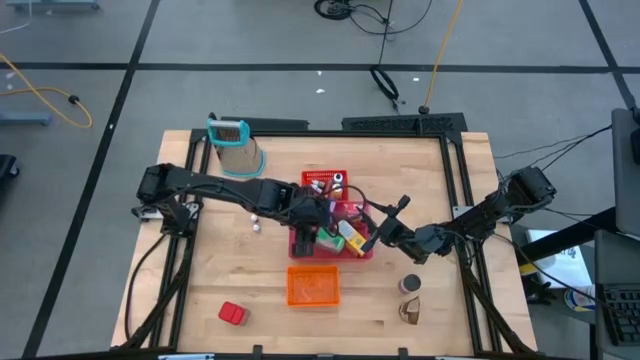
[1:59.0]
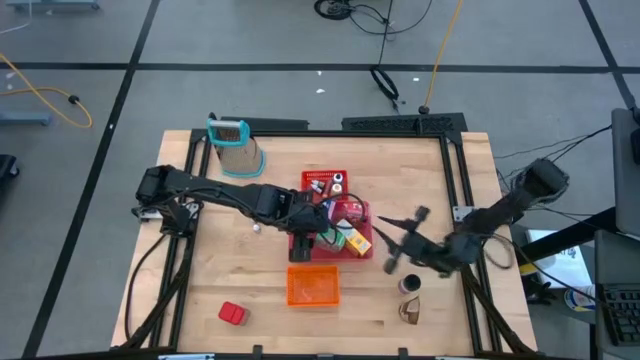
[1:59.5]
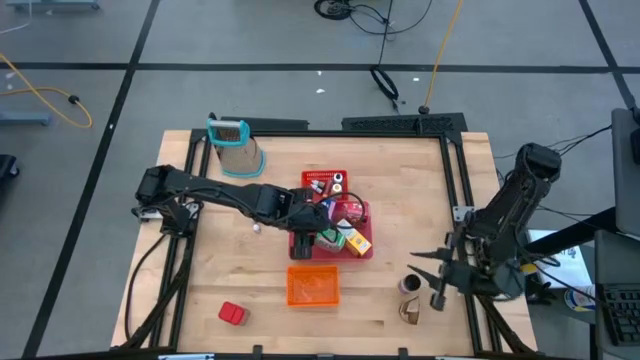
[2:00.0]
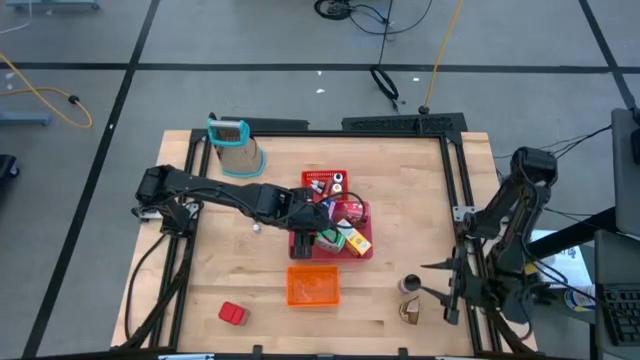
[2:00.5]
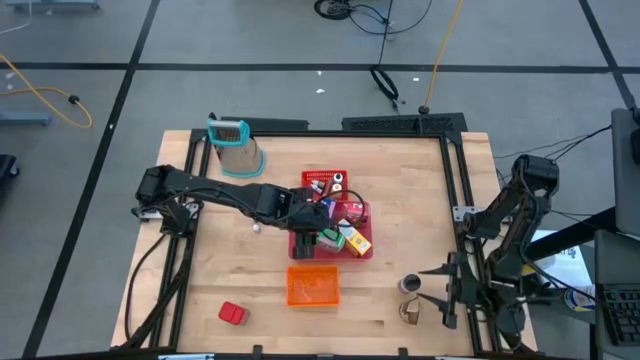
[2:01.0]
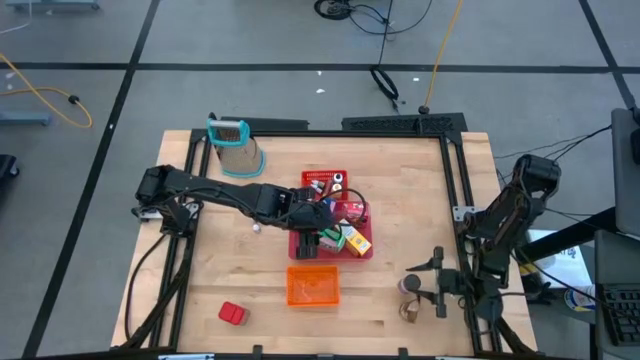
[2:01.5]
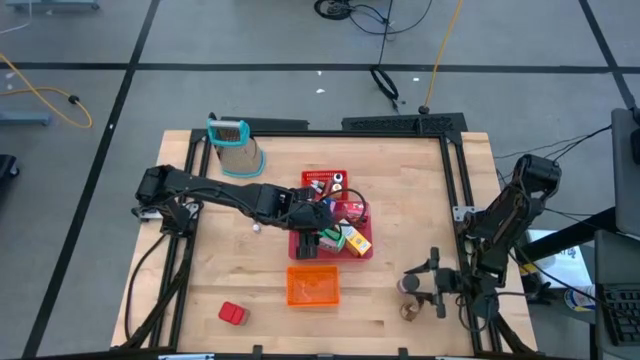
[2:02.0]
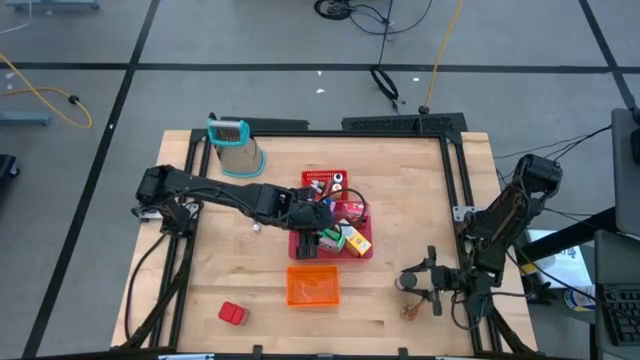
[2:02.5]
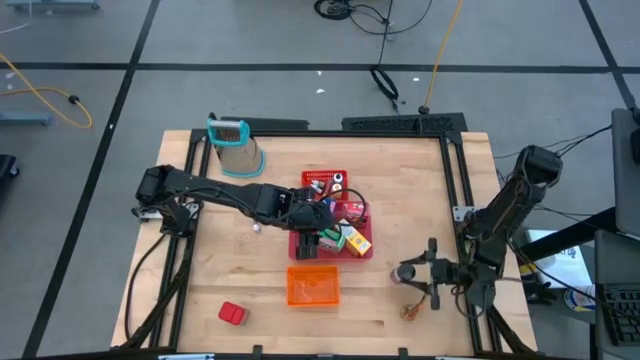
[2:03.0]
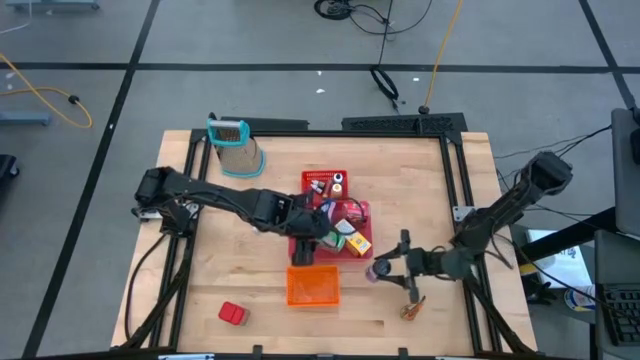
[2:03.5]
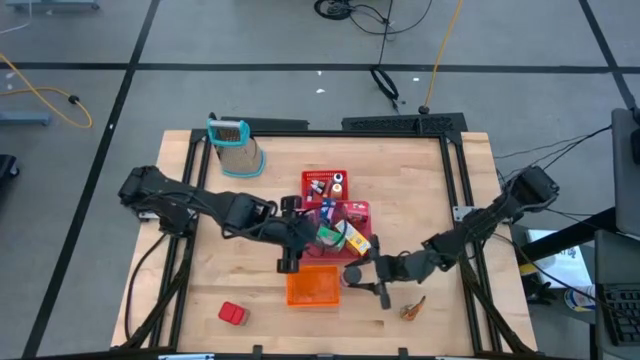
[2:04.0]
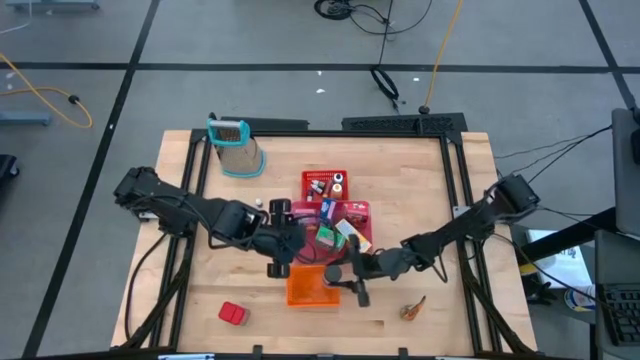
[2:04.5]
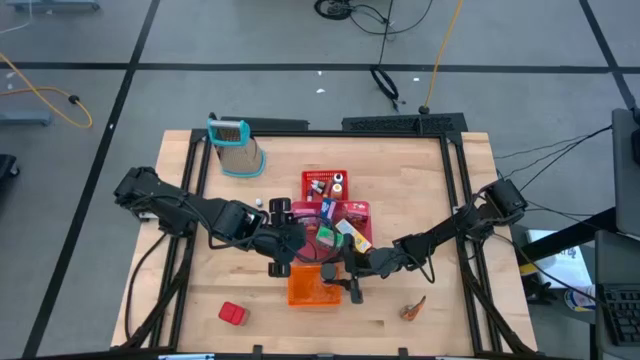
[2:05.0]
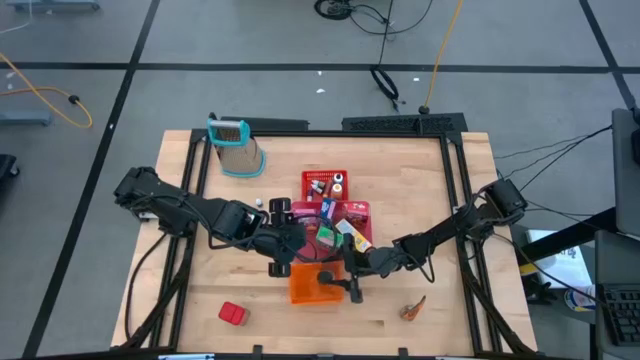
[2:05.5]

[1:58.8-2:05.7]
Task: Pick & Place Kitchen Items
Put the black seasoning bottle into the orange bin

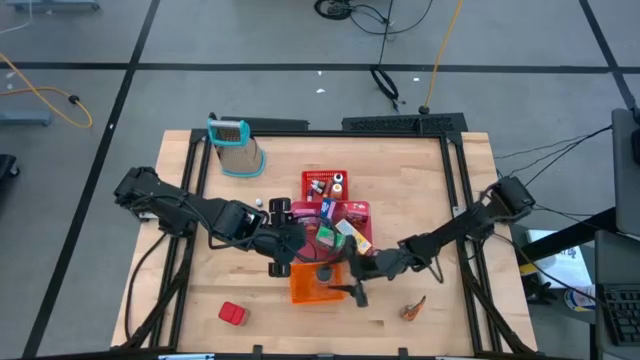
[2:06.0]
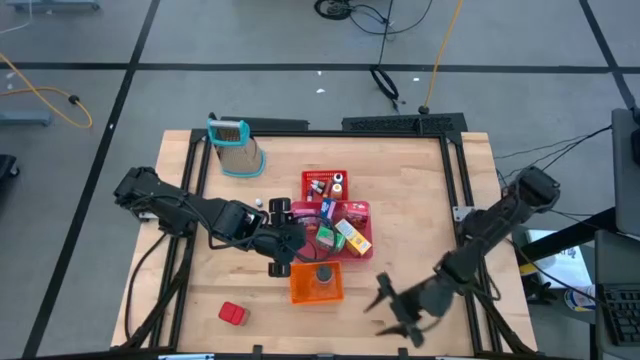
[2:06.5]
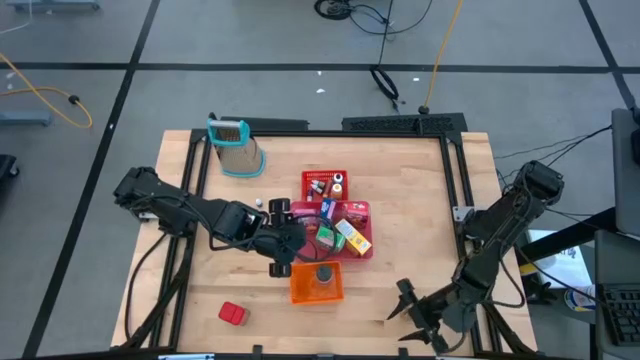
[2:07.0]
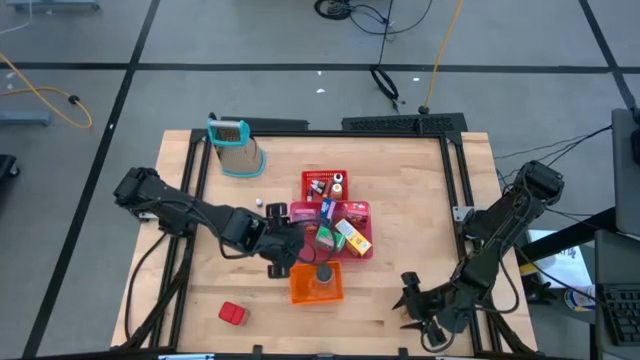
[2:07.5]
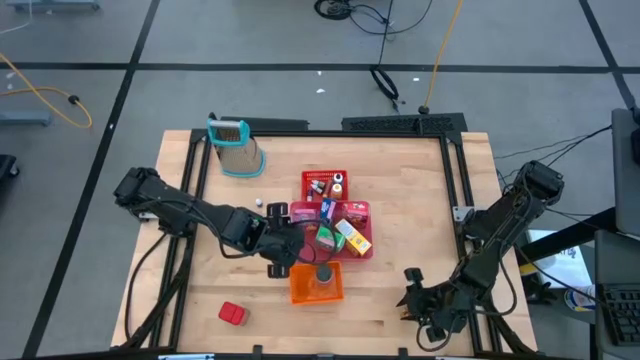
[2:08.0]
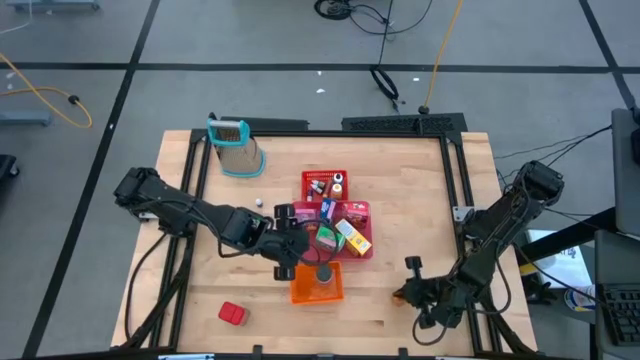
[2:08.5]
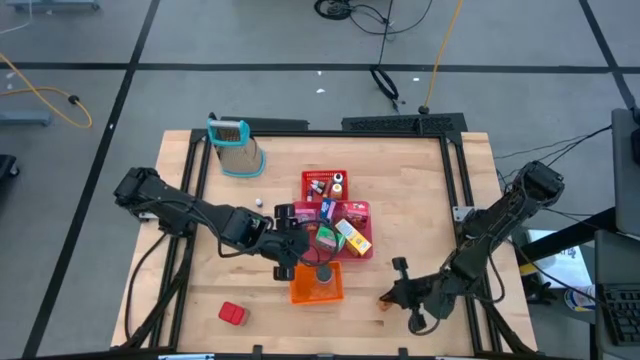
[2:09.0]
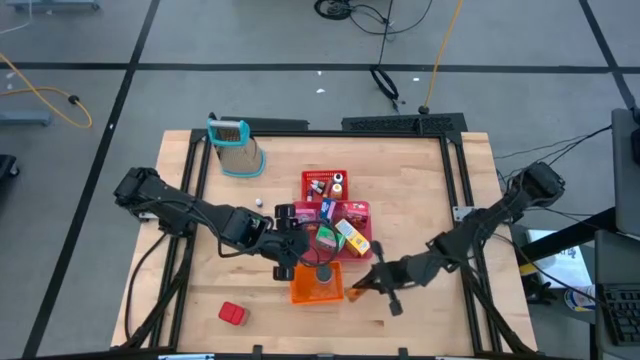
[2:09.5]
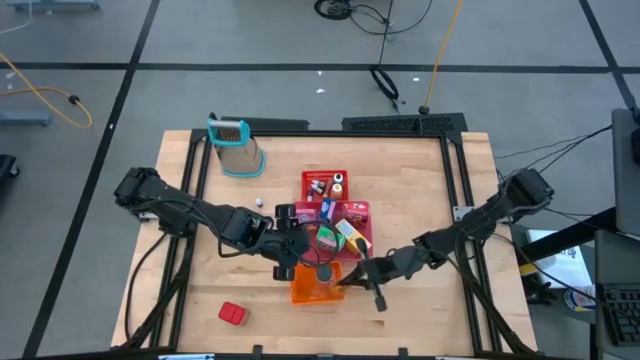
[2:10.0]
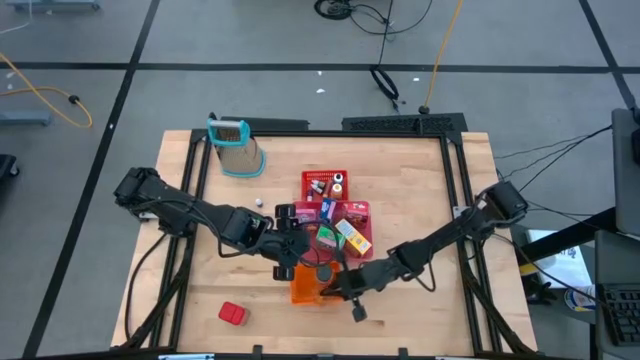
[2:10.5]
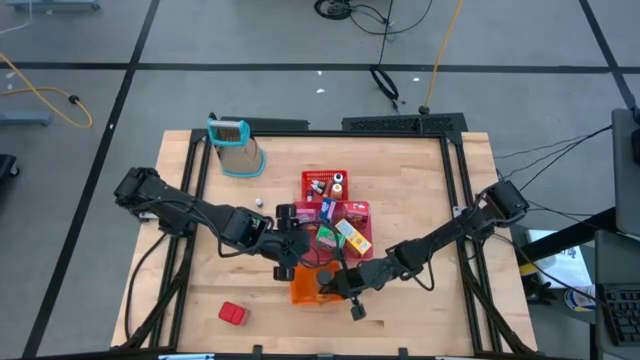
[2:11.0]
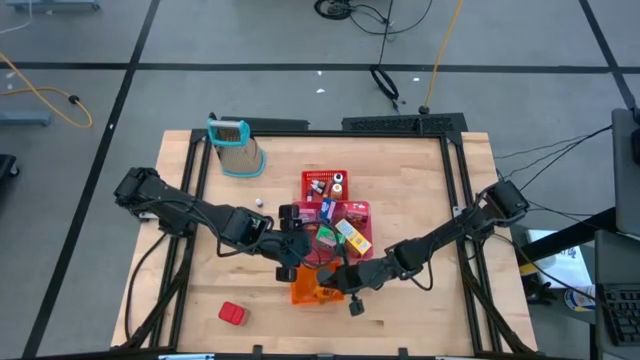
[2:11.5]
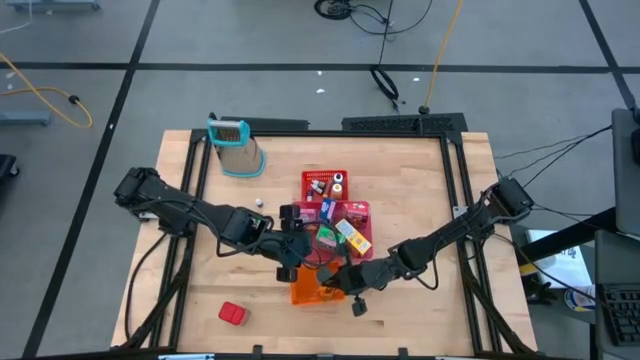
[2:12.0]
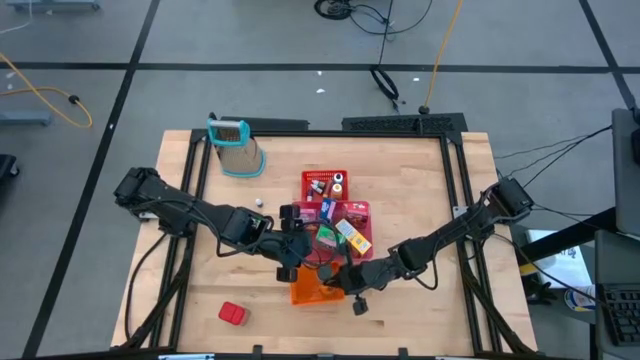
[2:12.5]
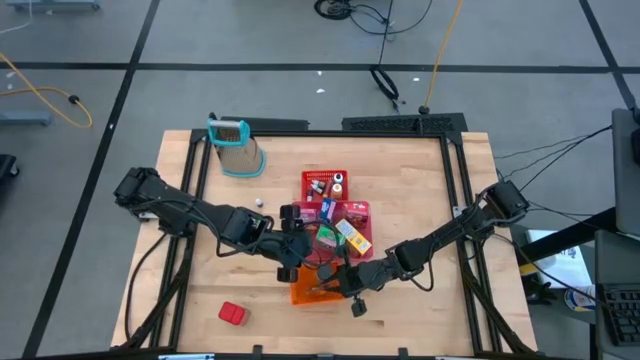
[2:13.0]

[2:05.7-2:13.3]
Put the orange seasoning pack into the orange bin

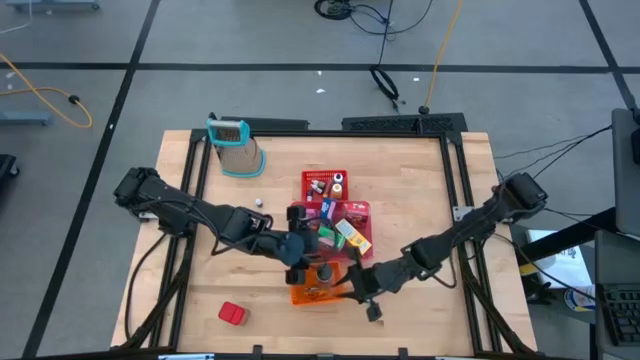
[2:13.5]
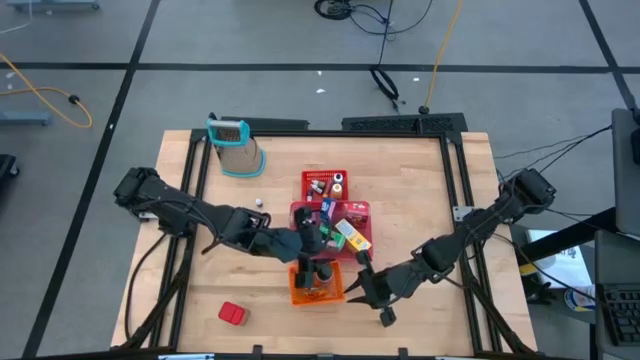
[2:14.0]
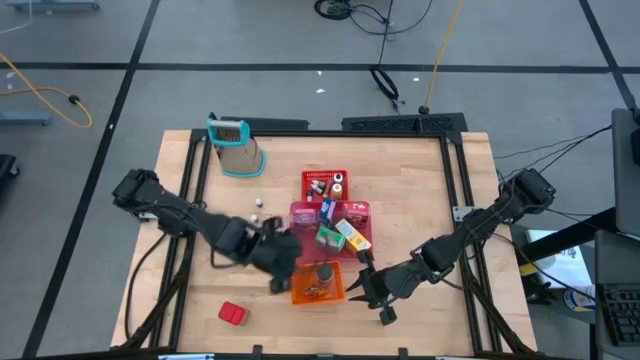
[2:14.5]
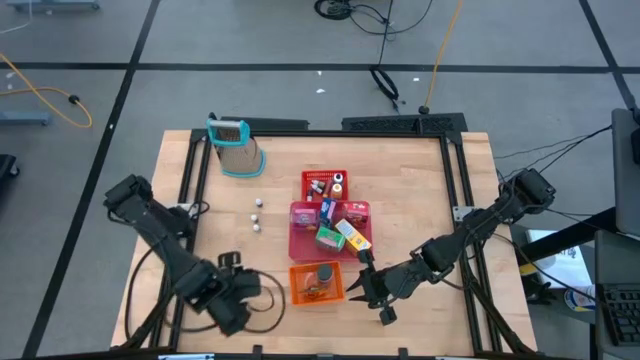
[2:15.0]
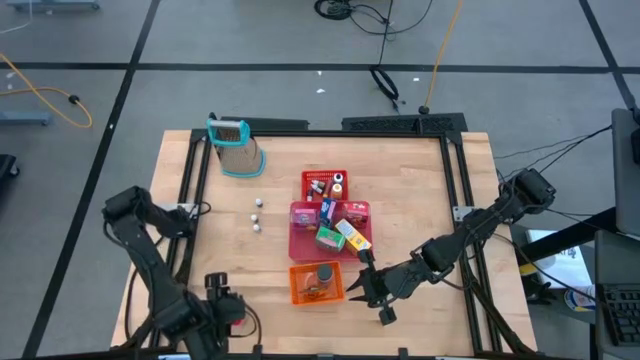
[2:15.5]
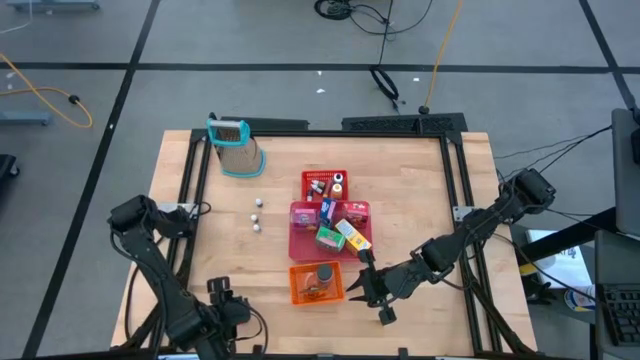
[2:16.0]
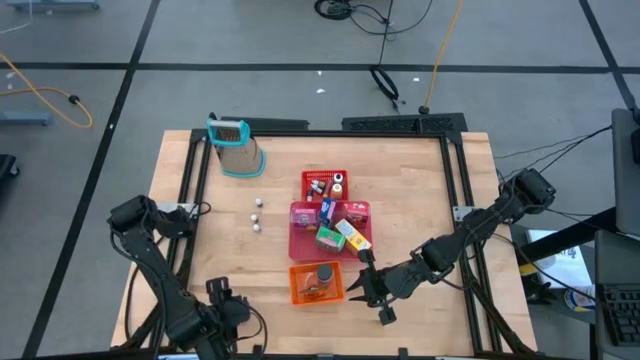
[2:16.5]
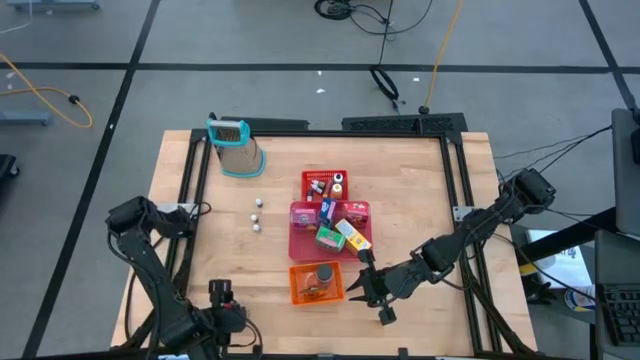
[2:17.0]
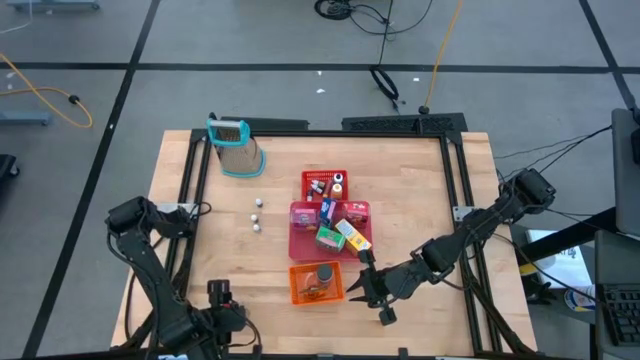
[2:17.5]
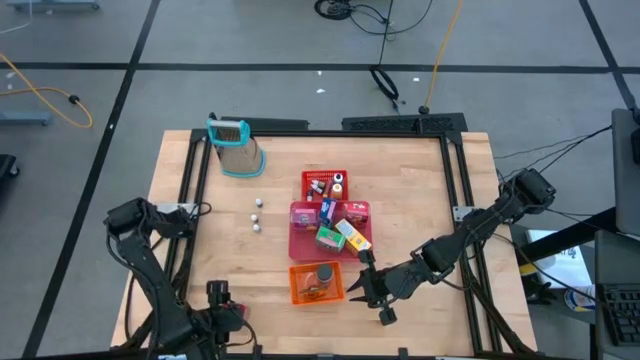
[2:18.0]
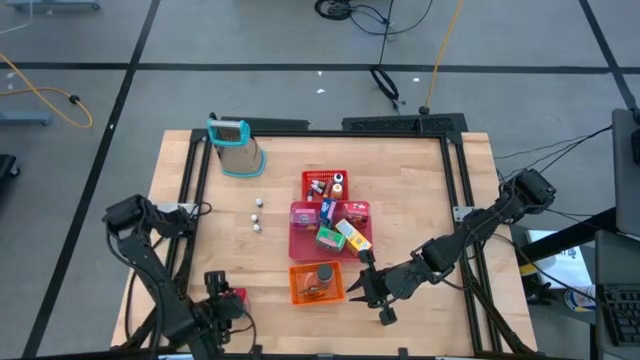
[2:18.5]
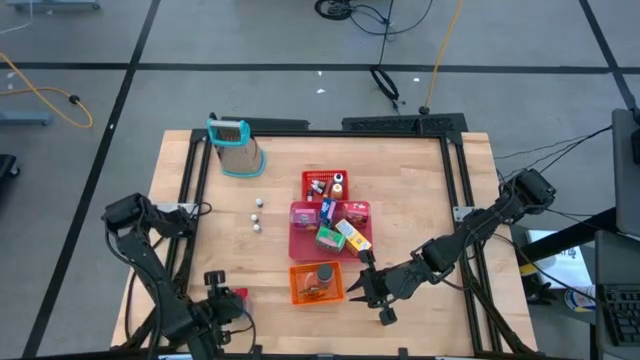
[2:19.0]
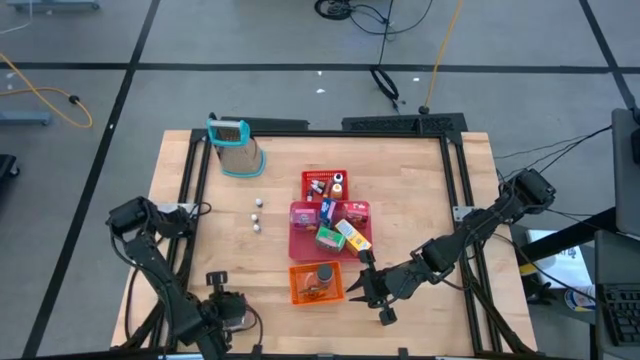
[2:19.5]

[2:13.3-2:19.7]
Put the red seasoning can into the orange bin
